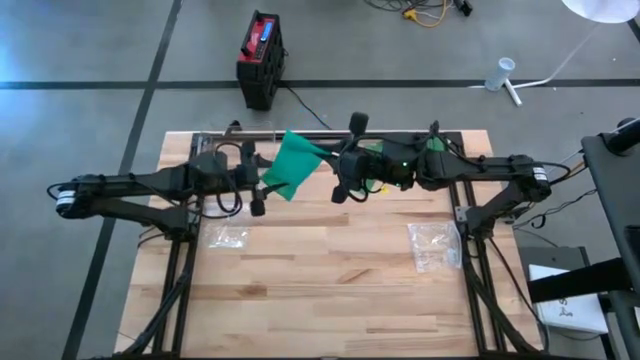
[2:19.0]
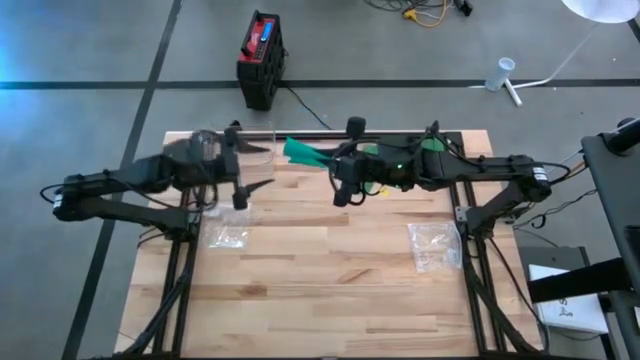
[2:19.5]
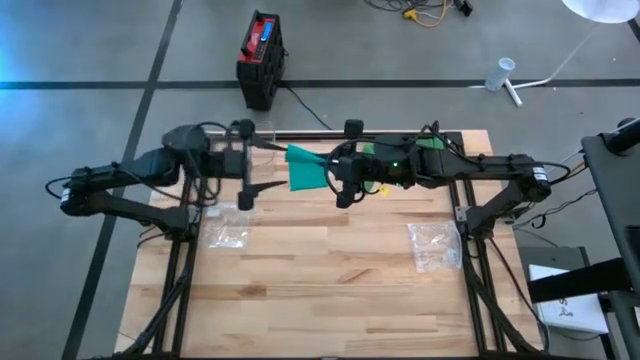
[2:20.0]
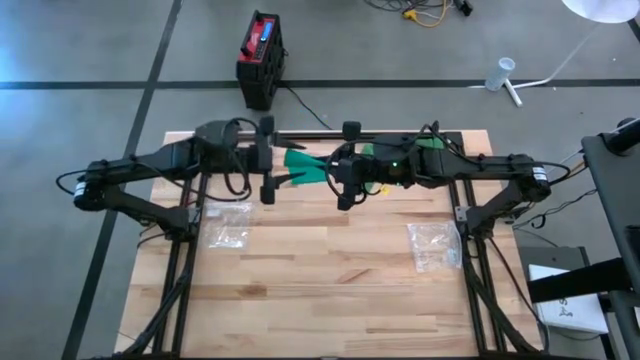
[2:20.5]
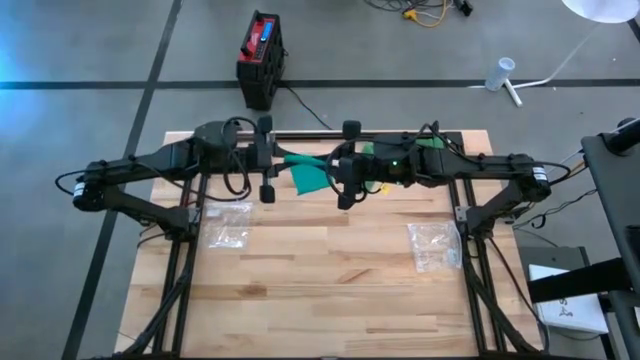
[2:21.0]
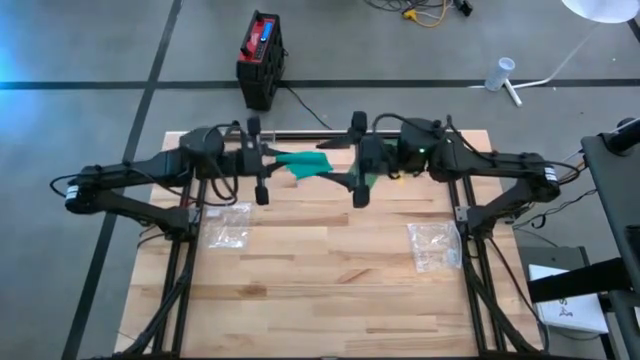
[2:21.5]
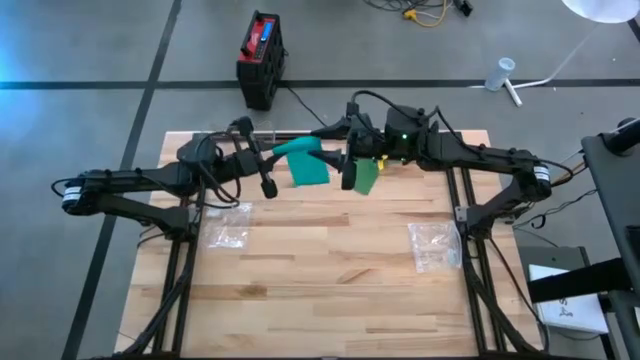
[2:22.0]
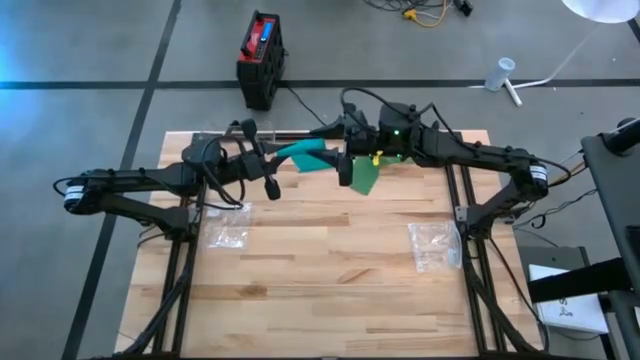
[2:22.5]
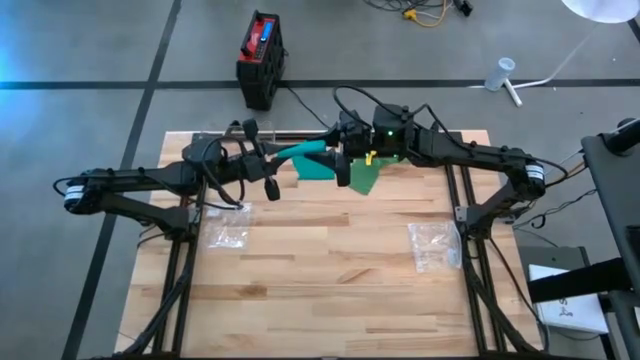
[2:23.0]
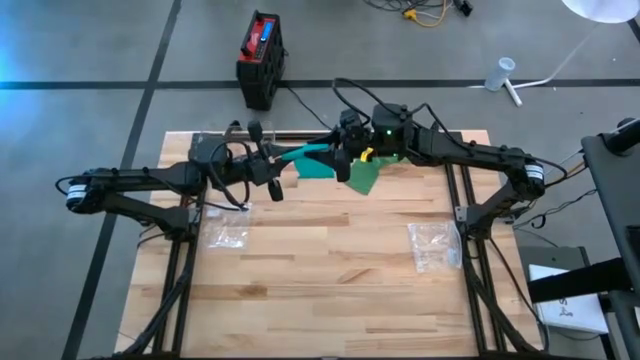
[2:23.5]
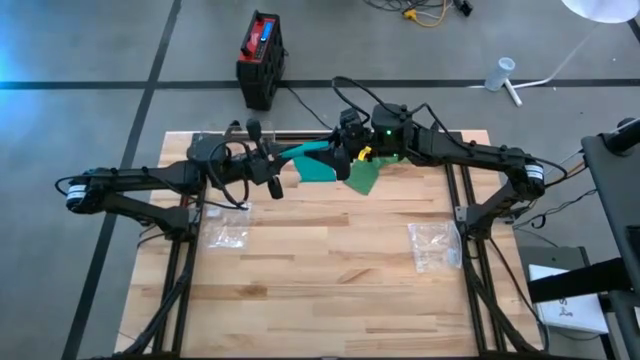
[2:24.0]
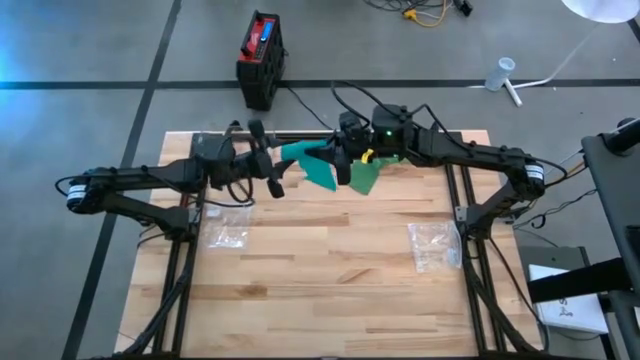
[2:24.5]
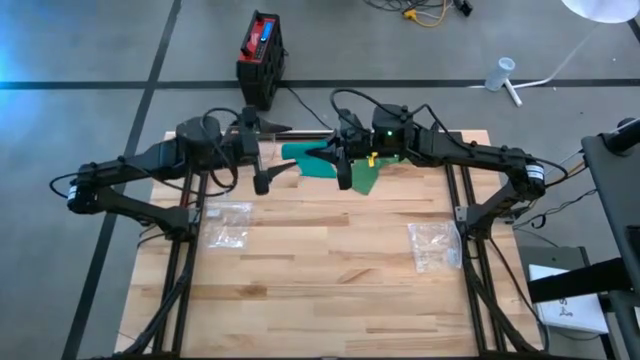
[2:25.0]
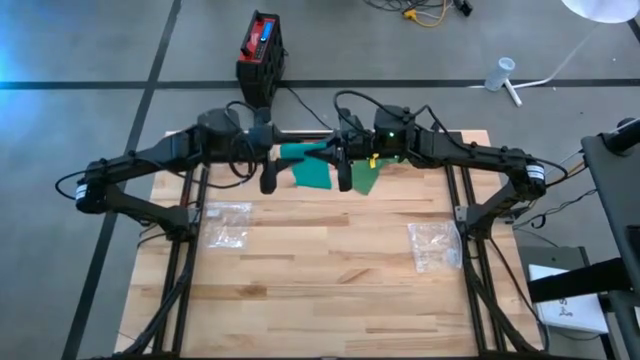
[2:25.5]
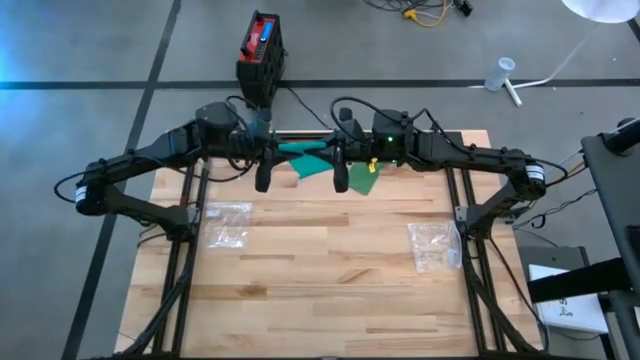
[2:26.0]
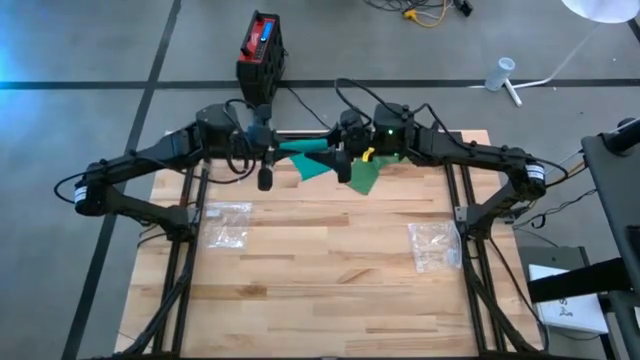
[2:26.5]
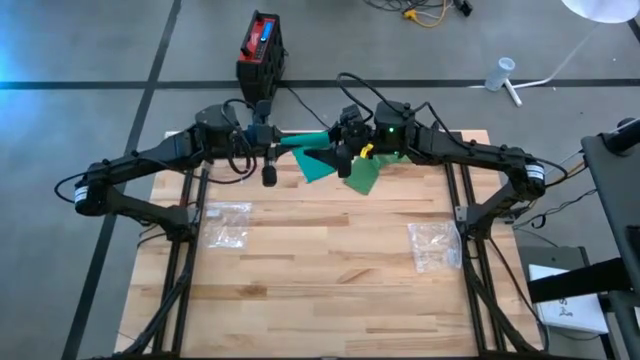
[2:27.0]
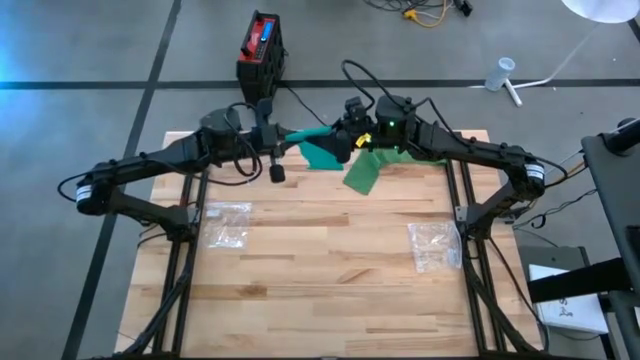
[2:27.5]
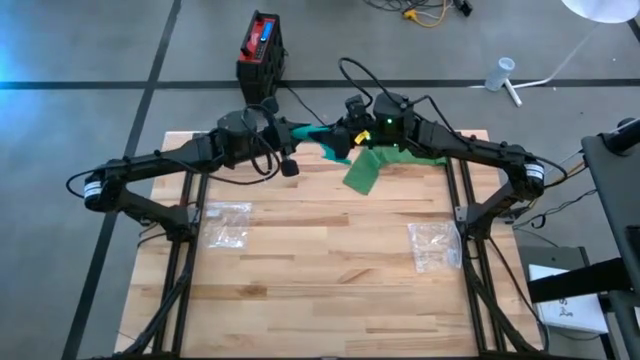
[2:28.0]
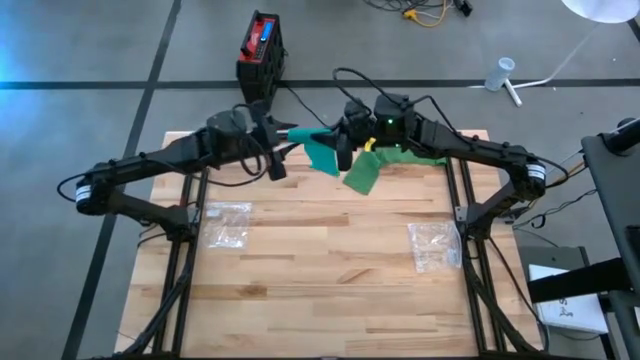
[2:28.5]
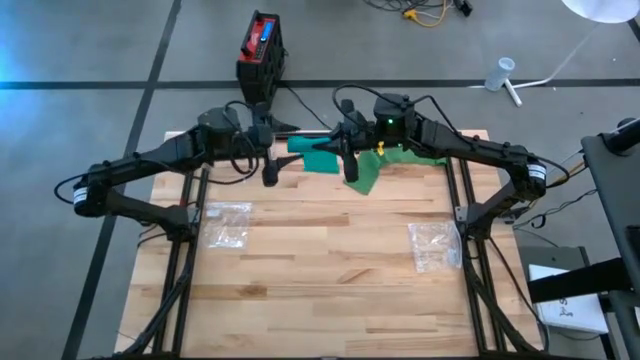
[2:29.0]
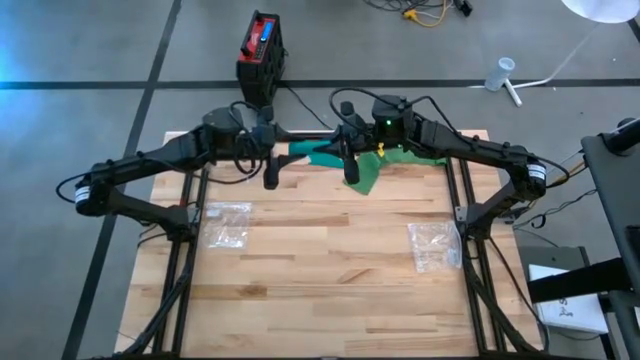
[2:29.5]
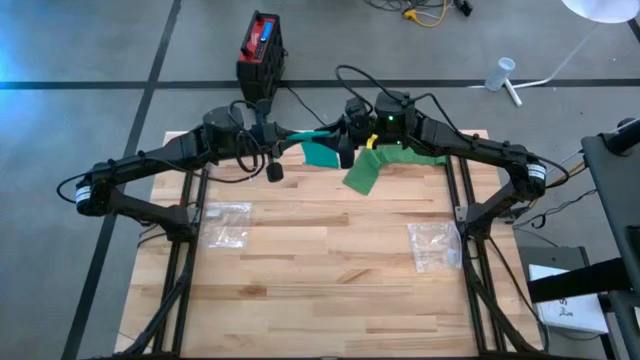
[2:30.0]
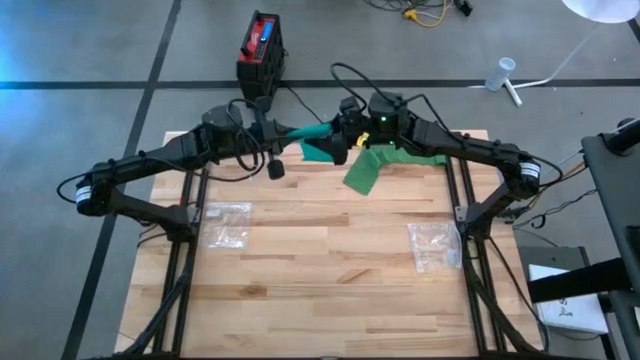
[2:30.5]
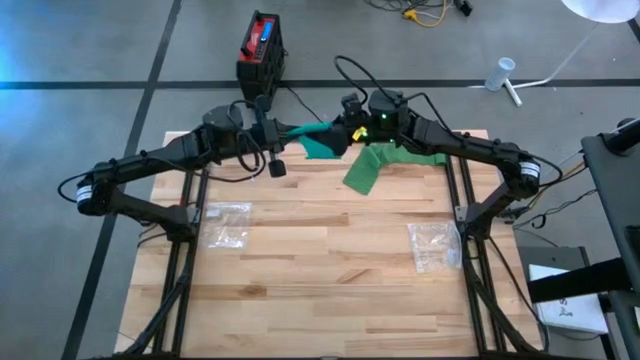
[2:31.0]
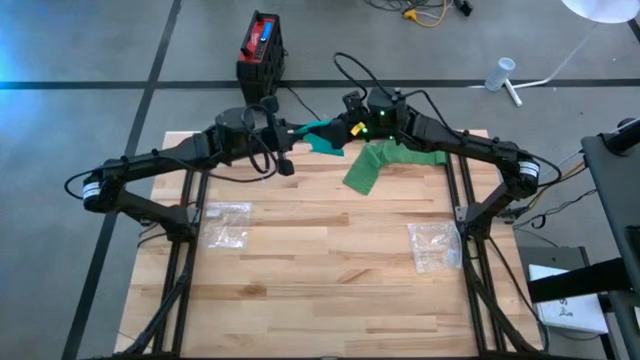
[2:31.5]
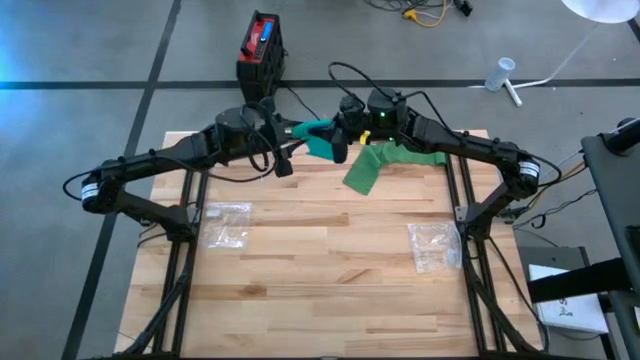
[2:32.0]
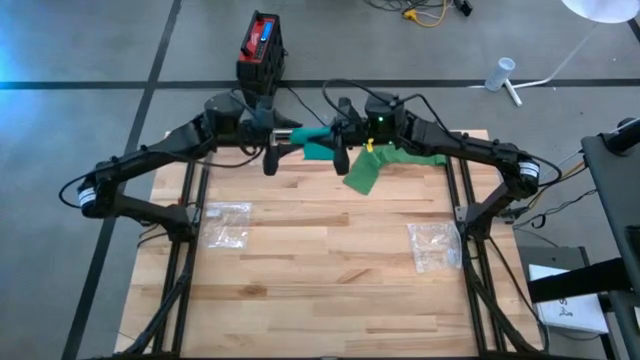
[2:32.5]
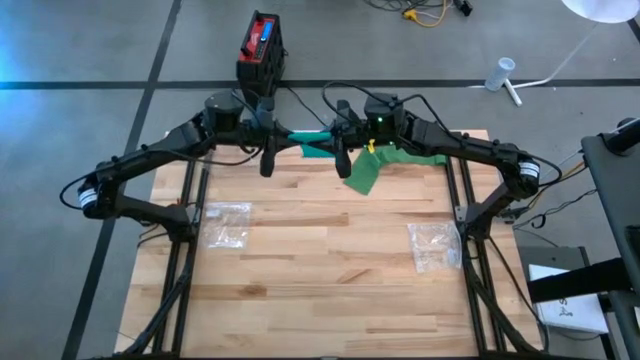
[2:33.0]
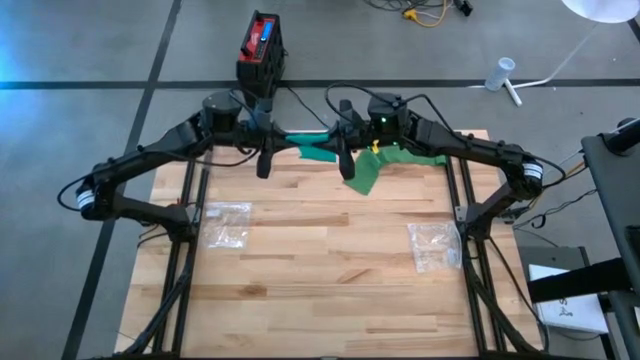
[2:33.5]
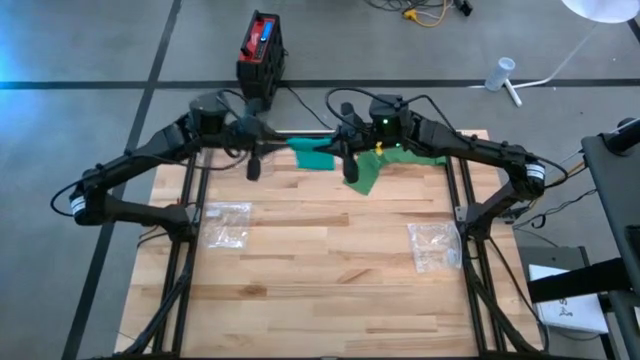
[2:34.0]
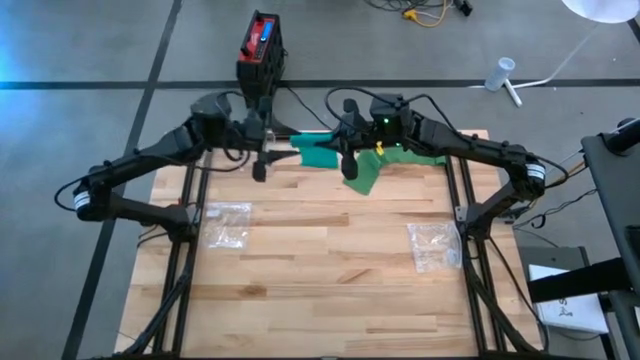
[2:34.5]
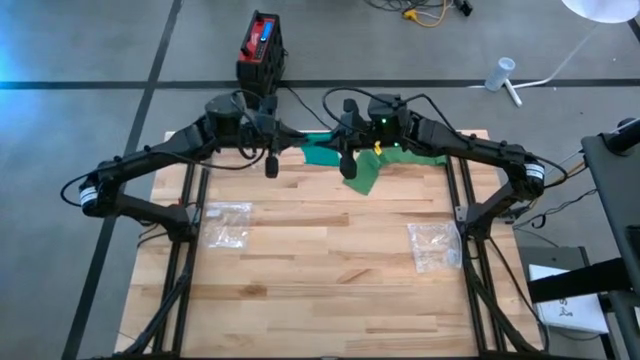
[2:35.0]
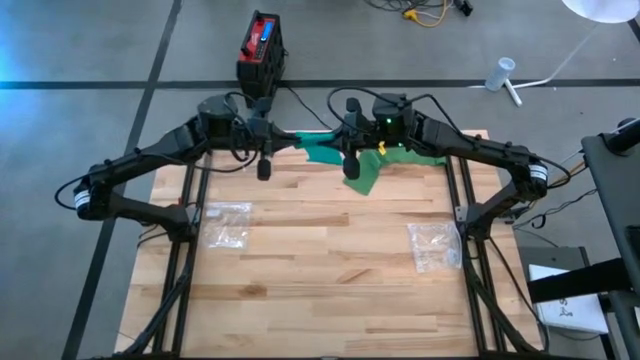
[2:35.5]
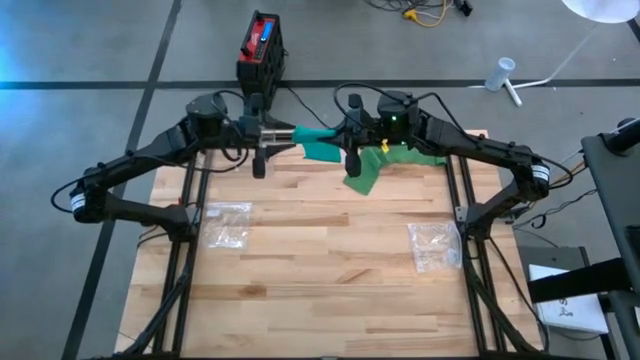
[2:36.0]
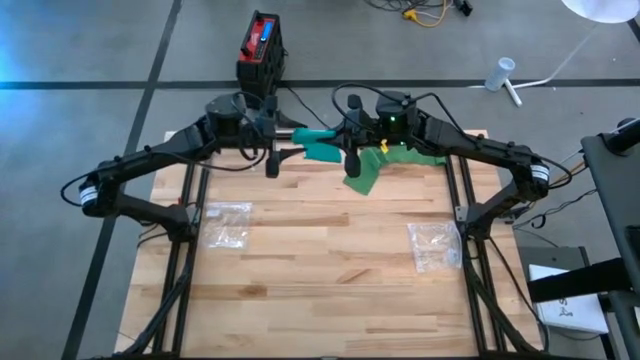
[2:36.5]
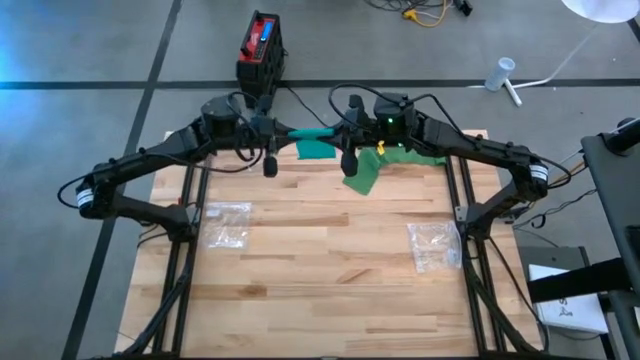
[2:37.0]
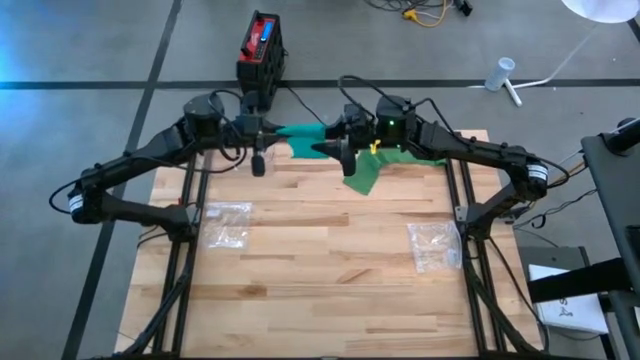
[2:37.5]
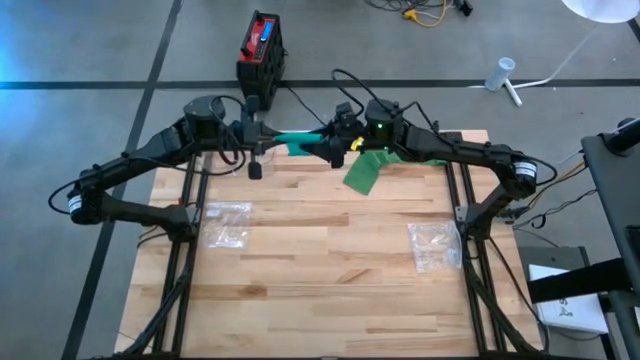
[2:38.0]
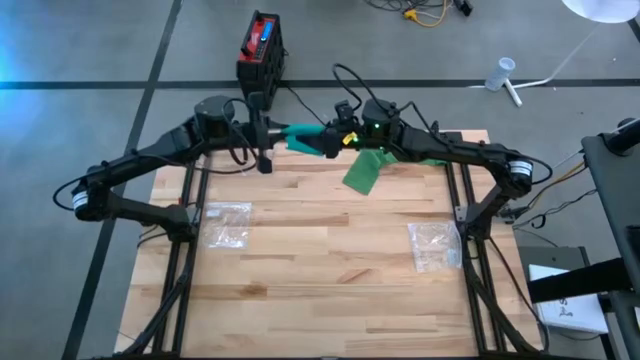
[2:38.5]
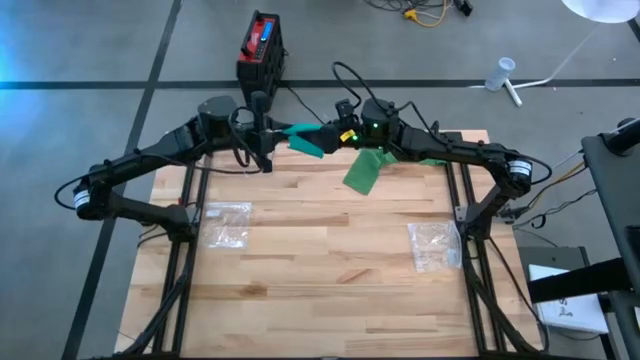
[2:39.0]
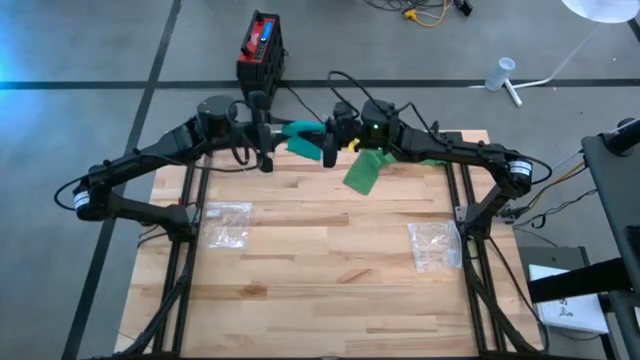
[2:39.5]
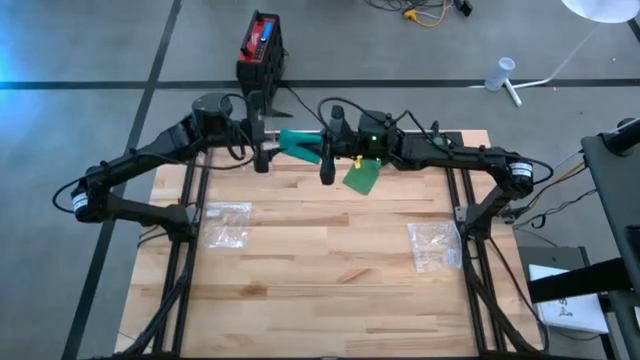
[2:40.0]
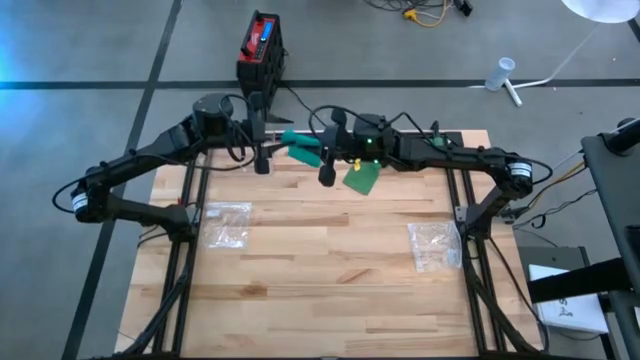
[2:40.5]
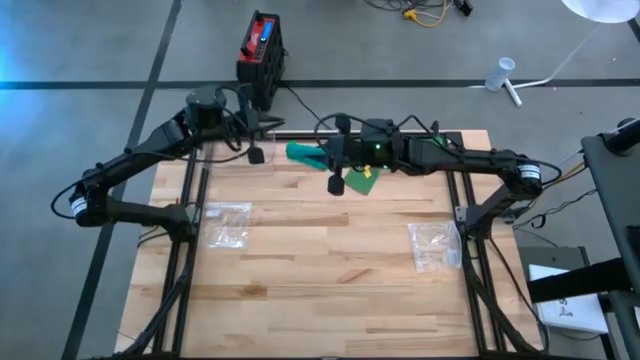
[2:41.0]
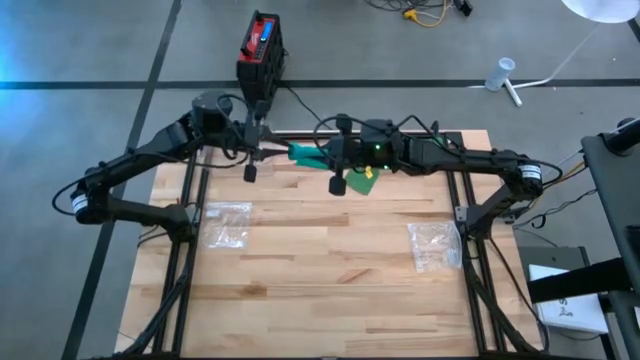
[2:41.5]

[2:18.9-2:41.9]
Task: Roll bandage
Roll the blue bandage
